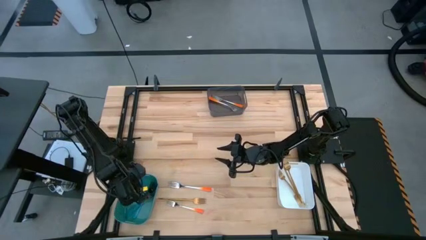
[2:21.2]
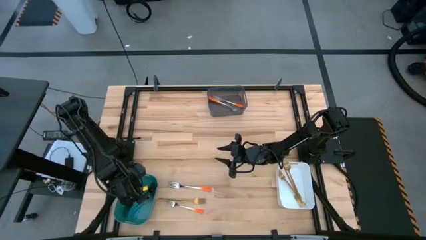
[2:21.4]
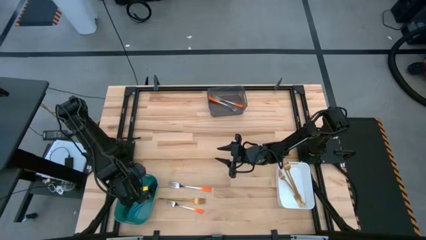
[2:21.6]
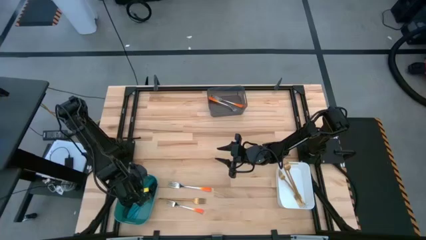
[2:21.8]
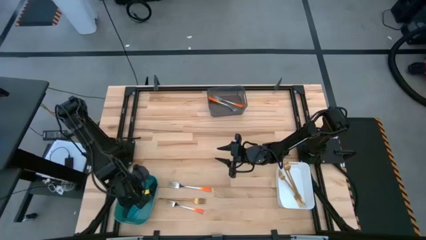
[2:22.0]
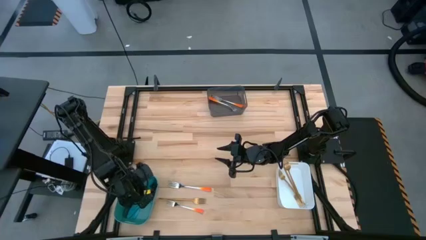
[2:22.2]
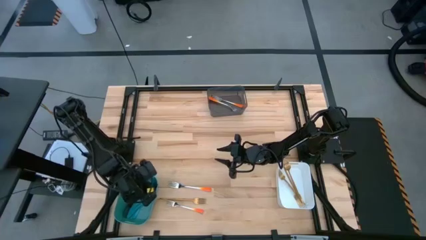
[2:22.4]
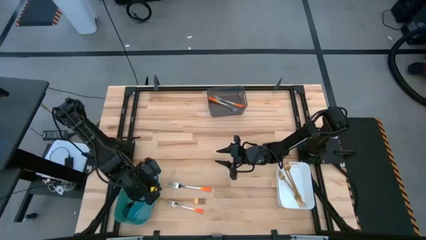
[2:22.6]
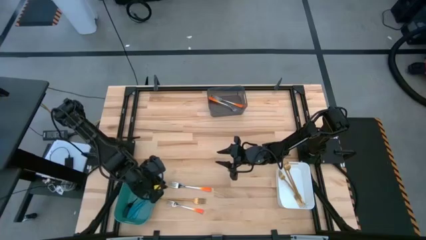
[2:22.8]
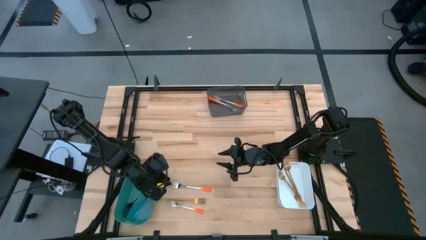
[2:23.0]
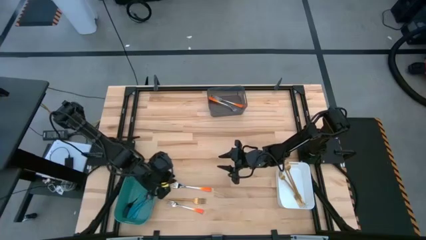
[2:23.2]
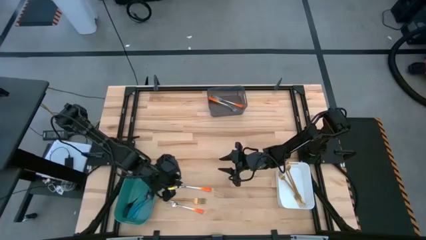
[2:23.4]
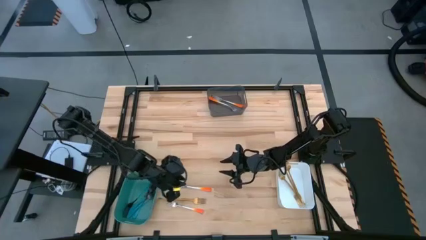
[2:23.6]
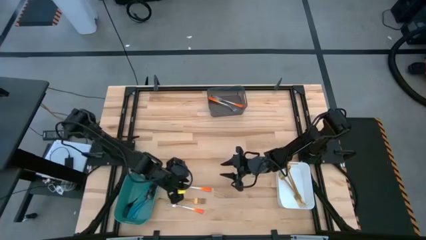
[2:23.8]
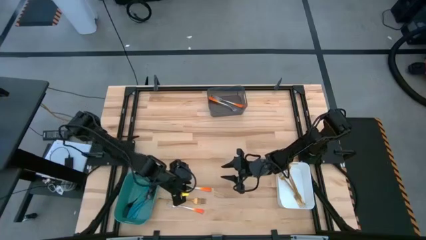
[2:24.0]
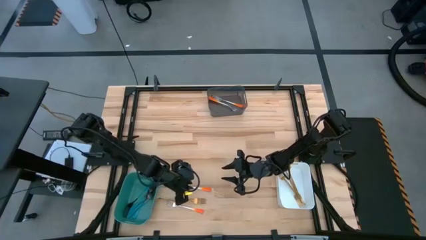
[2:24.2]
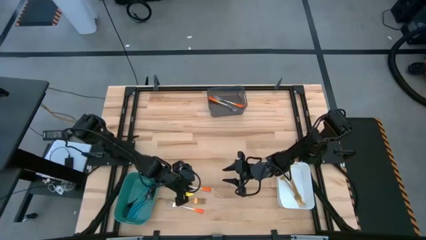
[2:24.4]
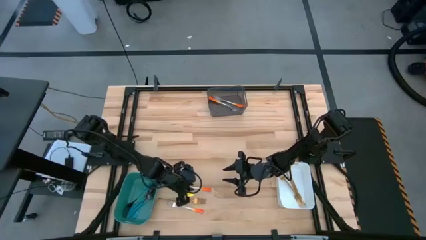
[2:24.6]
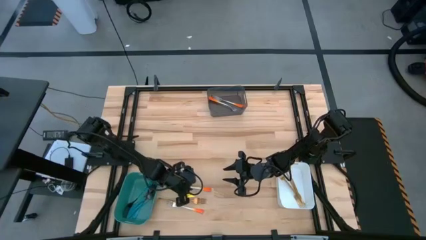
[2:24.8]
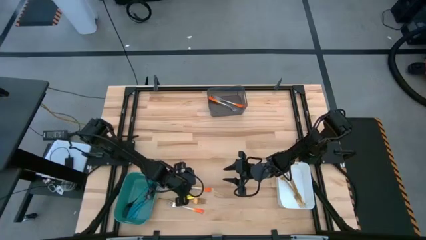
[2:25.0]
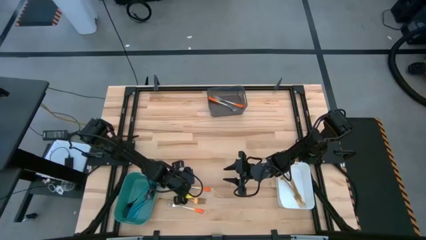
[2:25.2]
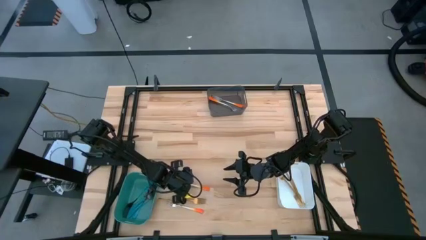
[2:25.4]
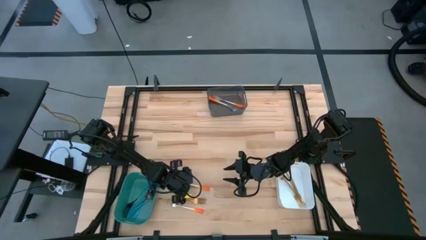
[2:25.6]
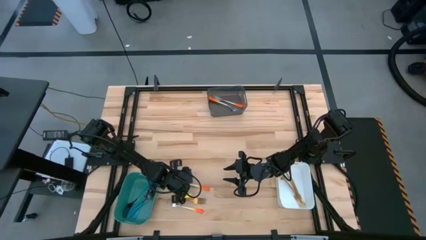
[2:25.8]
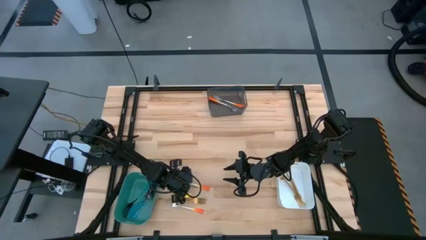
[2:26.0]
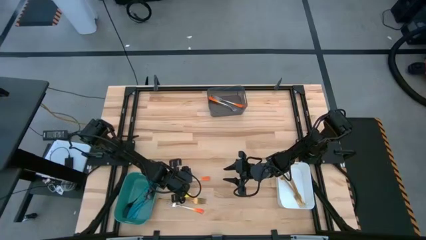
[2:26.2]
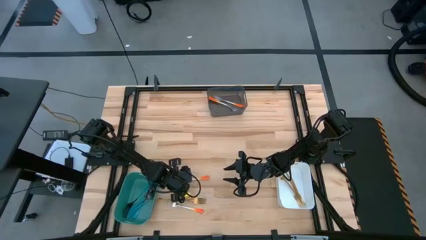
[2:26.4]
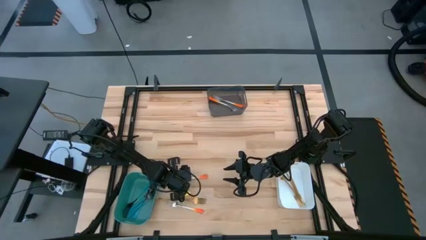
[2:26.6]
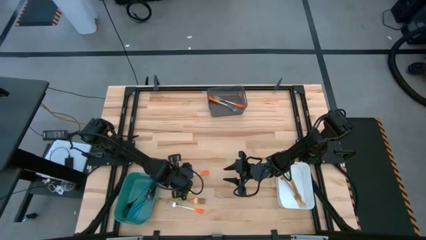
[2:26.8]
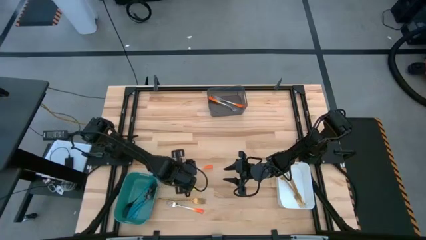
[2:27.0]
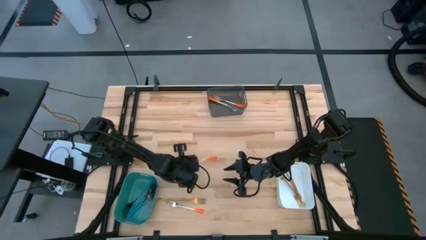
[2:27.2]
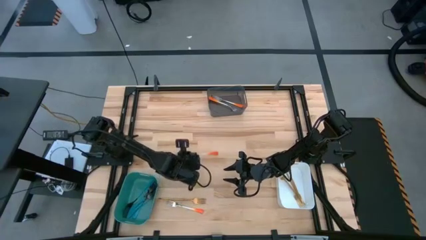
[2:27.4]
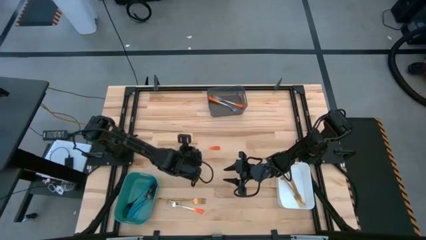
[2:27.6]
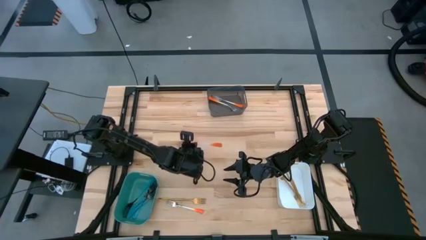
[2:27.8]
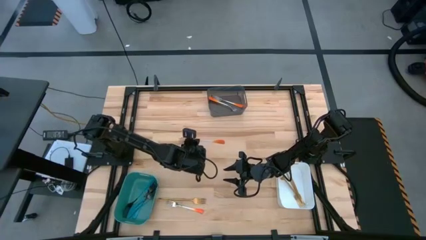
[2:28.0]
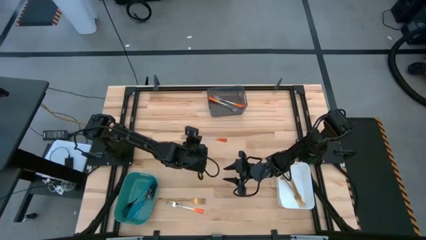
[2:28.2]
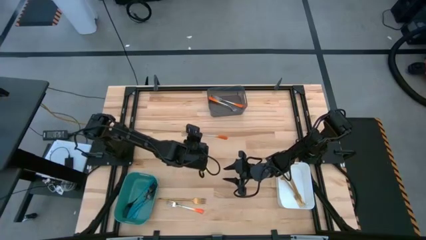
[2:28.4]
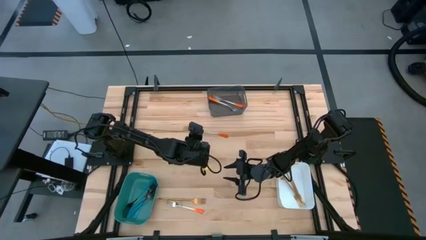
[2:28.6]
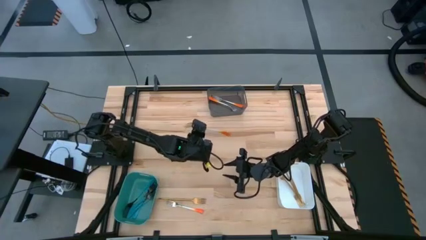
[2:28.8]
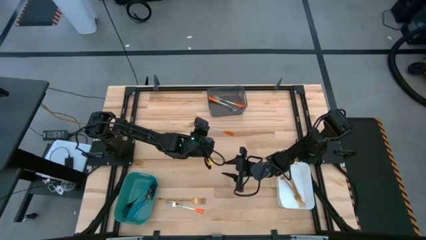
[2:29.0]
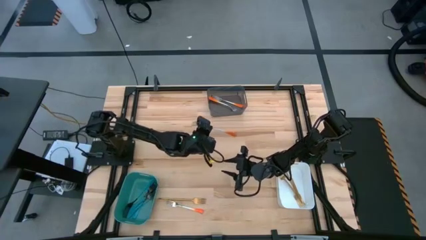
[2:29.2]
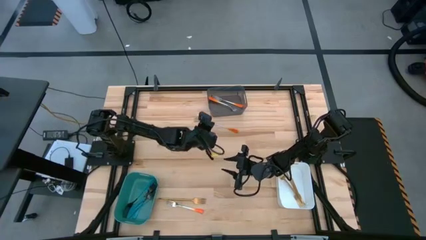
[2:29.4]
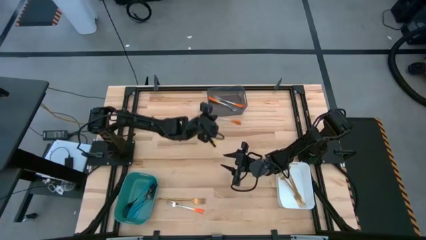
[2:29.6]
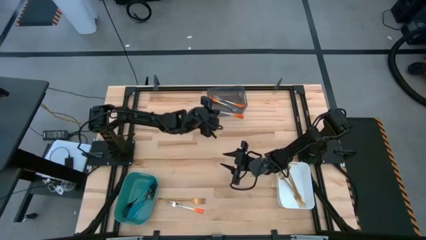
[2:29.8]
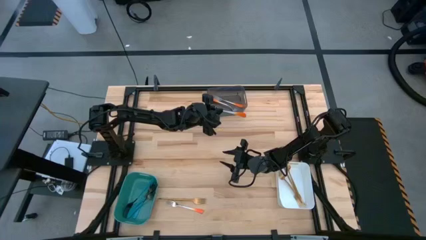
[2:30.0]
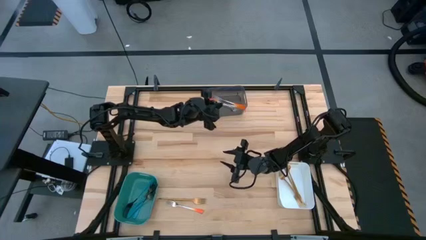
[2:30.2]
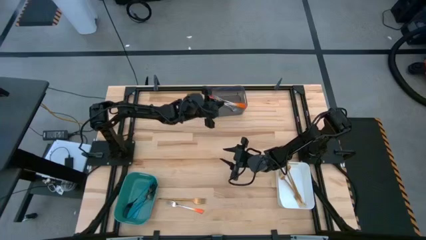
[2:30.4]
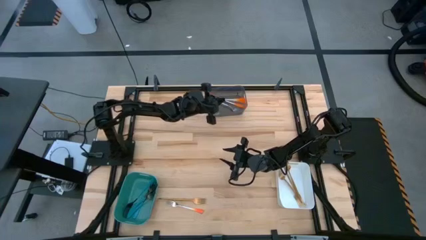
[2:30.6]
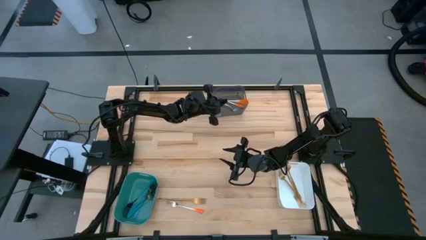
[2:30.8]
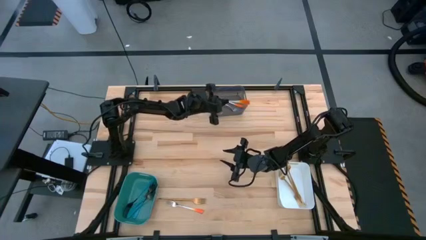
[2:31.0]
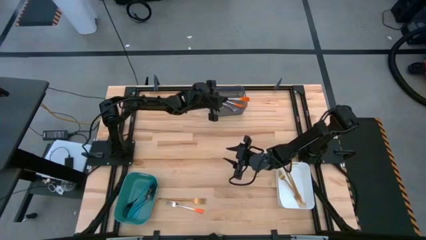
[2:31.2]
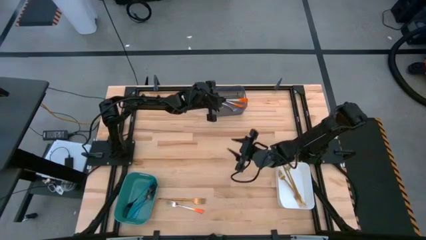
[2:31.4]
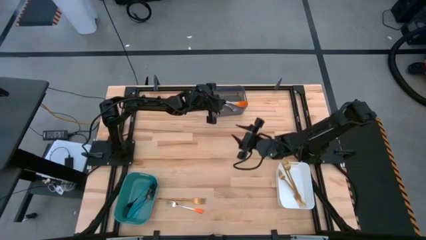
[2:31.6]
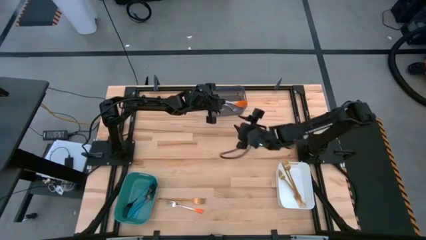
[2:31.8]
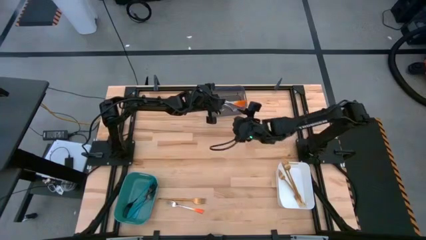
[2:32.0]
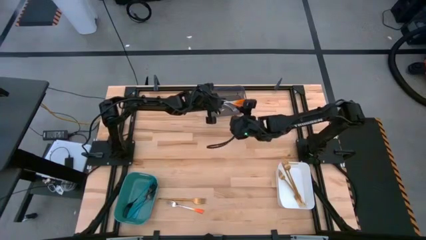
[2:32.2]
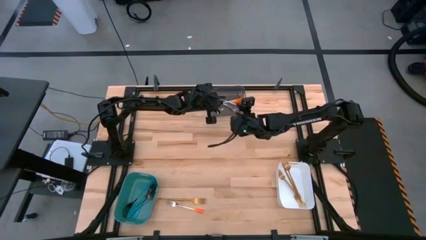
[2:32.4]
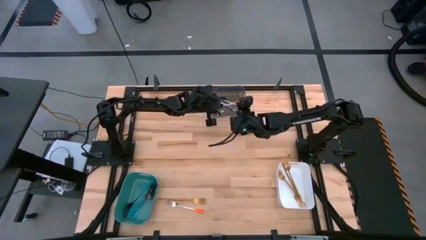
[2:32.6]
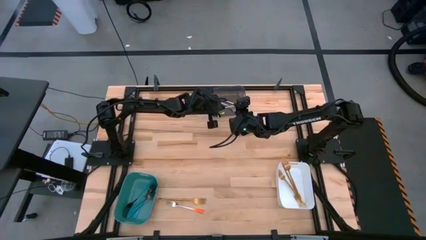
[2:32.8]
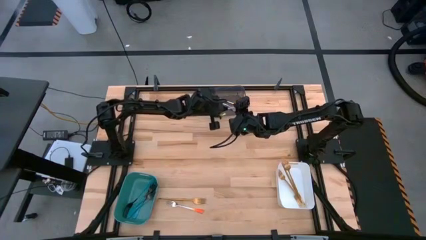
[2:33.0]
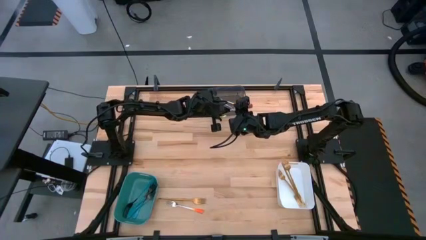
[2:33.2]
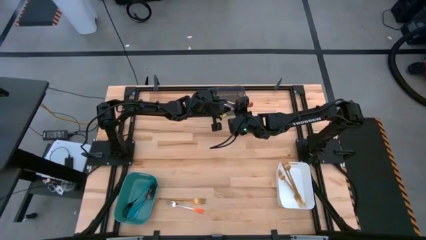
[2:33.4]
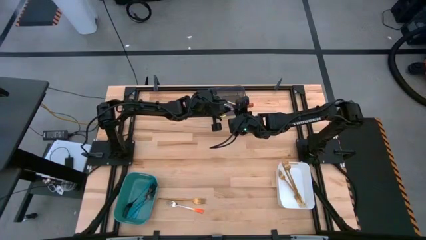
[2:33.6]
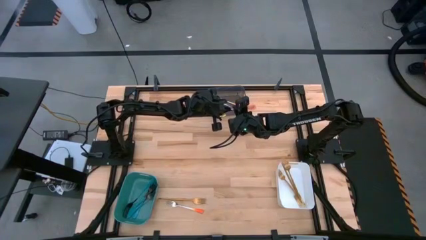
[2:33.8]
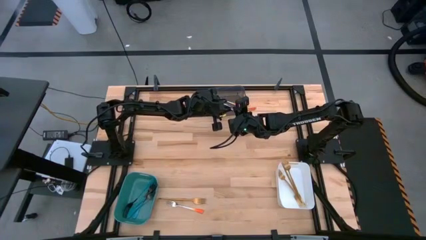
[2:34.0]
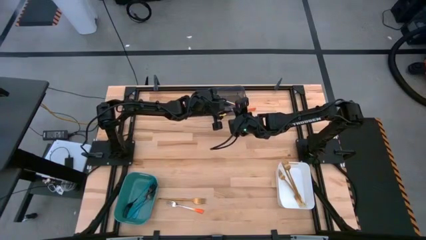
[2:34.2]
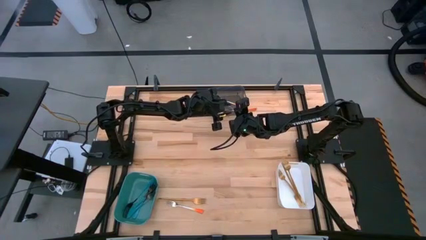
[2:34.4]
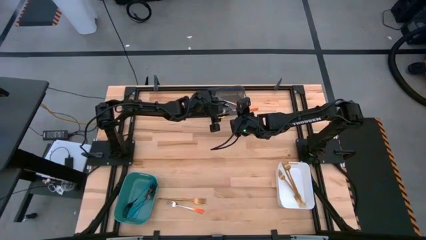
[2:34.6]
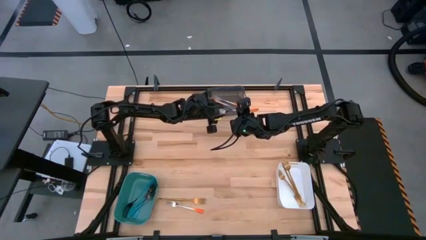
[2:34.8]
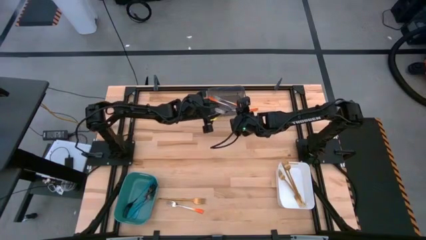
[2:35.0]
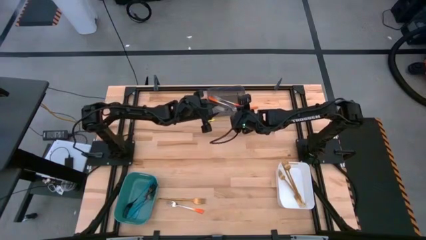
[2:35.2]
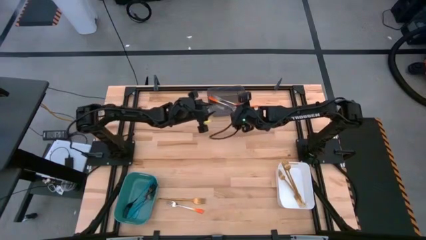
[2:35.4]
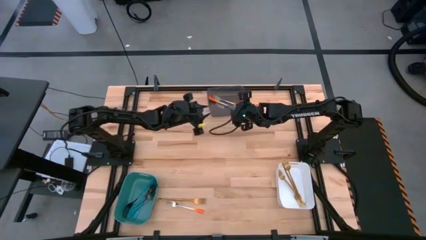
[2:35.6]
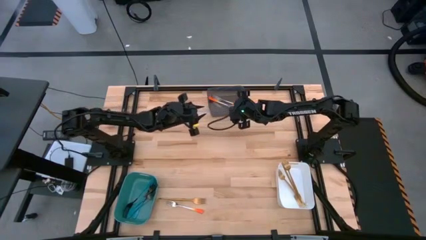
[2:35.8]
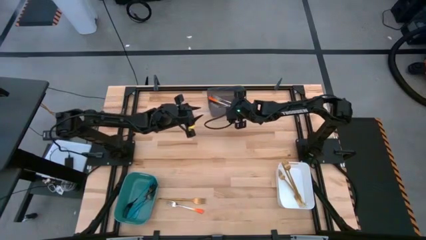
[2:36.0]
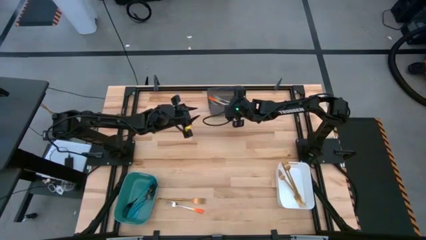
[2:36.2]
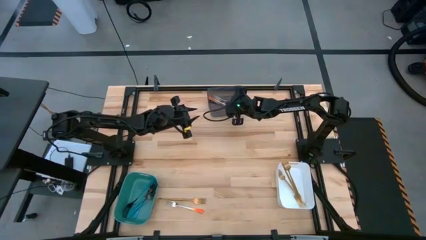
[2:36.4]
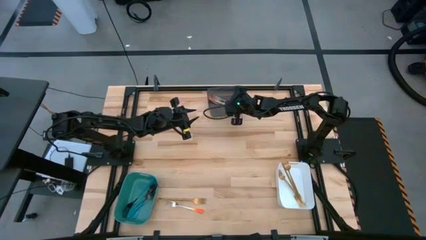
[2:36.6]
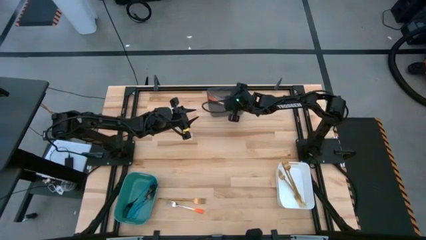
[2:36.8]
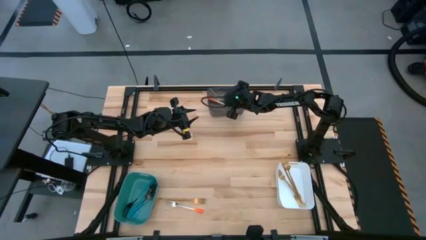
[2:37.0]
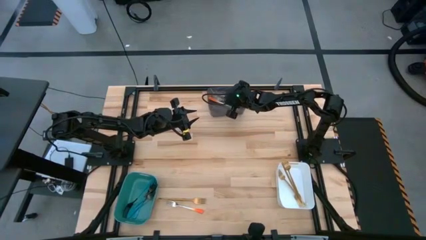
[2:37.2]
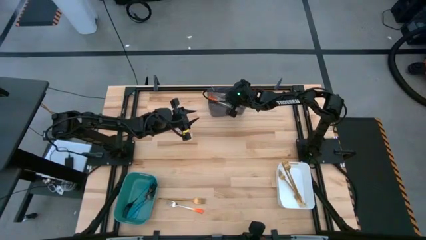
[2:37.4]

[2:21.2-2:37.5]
Task: Sort silverware by color (type)
Put the orange fork into the black bin
